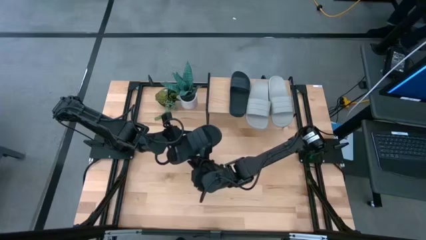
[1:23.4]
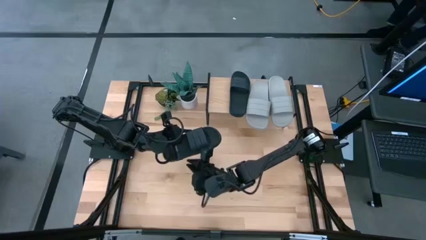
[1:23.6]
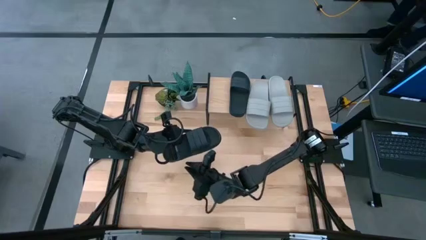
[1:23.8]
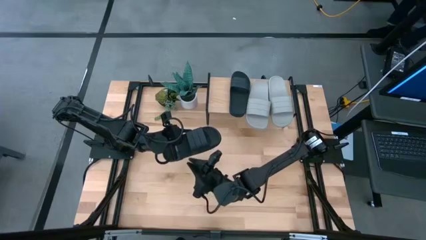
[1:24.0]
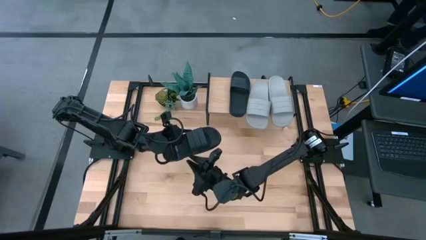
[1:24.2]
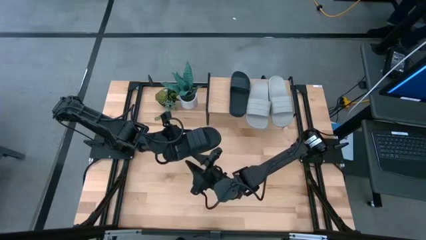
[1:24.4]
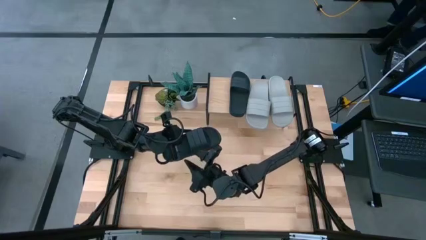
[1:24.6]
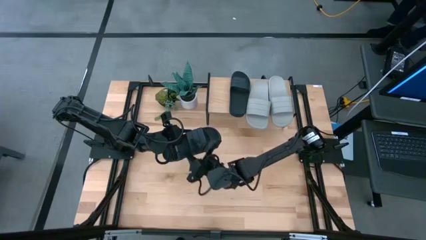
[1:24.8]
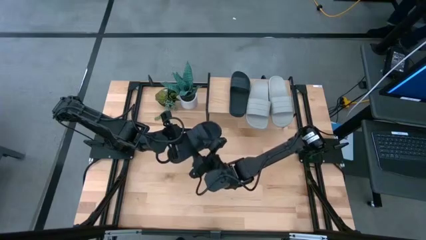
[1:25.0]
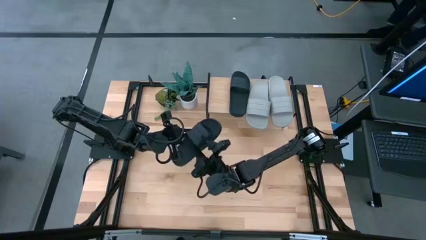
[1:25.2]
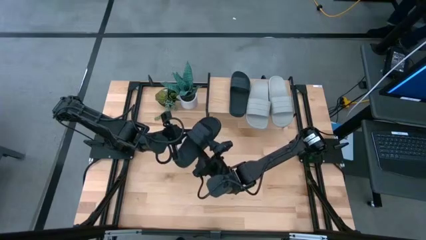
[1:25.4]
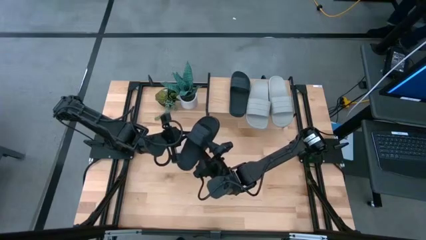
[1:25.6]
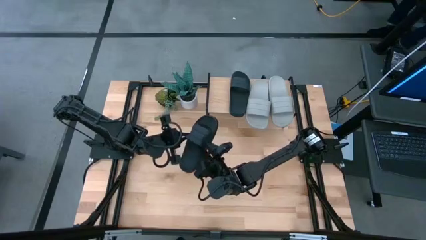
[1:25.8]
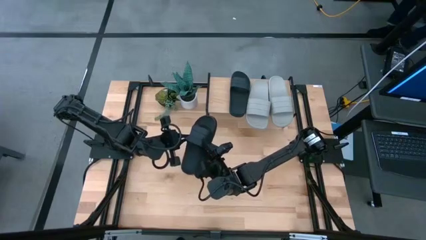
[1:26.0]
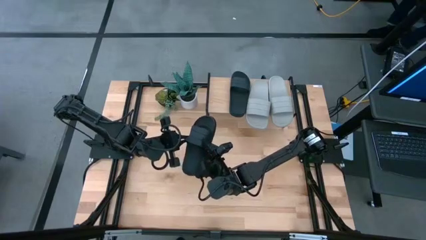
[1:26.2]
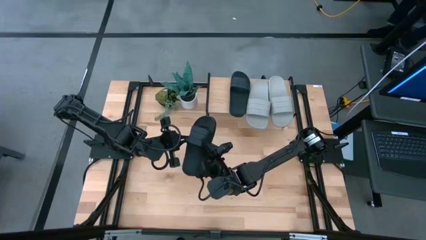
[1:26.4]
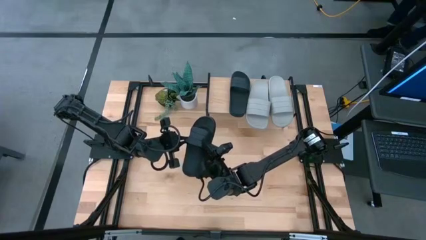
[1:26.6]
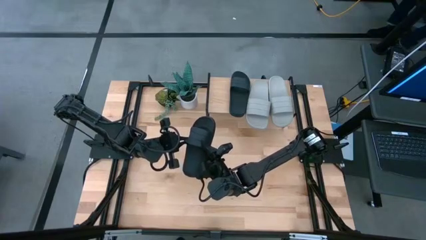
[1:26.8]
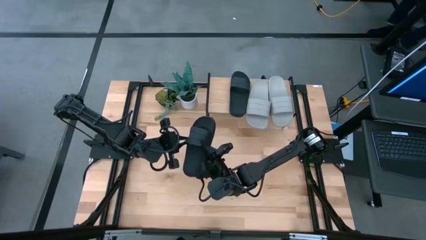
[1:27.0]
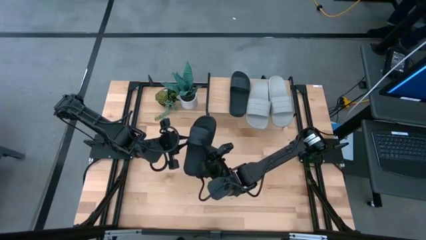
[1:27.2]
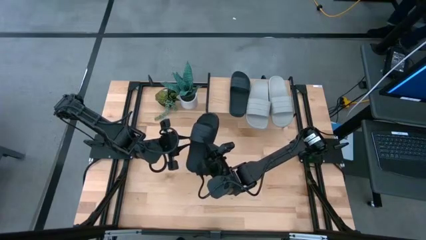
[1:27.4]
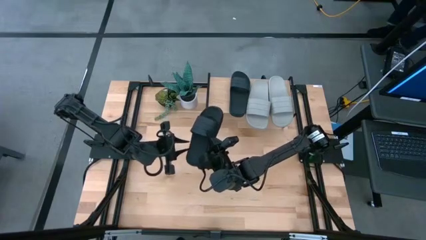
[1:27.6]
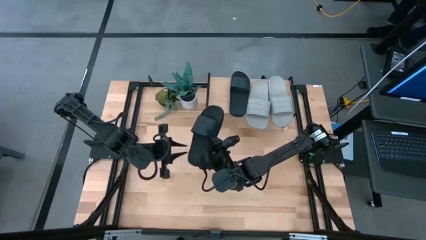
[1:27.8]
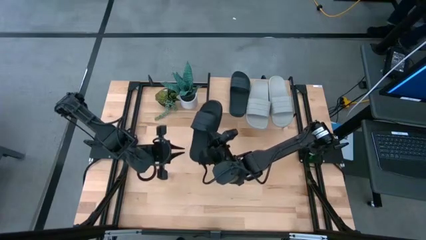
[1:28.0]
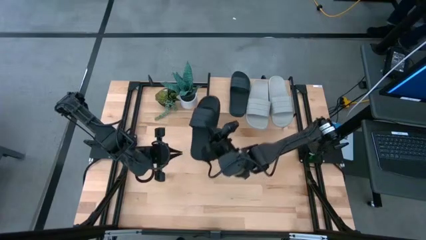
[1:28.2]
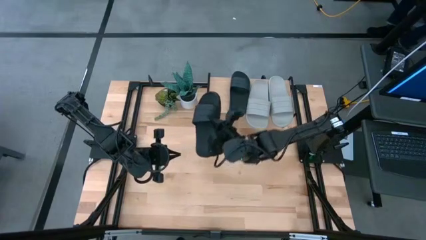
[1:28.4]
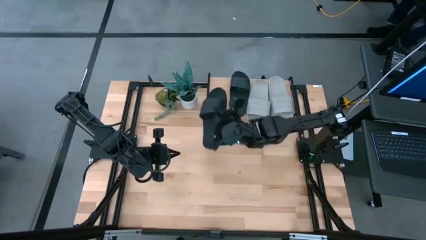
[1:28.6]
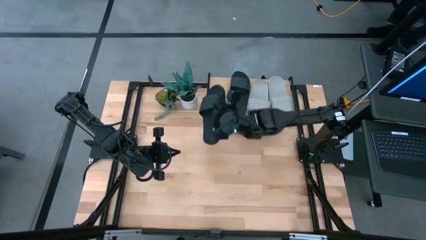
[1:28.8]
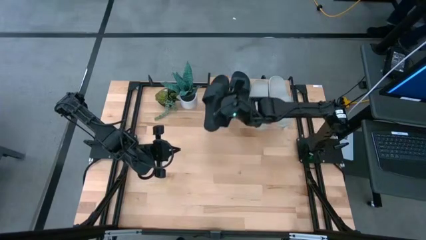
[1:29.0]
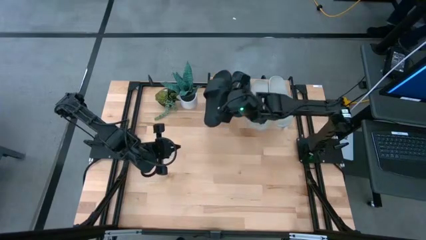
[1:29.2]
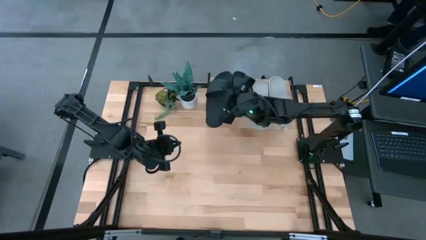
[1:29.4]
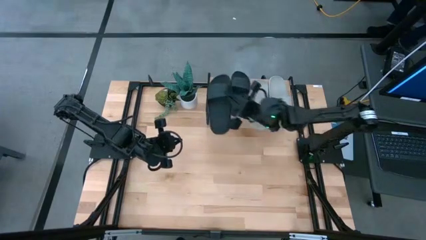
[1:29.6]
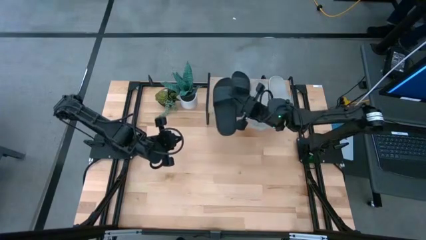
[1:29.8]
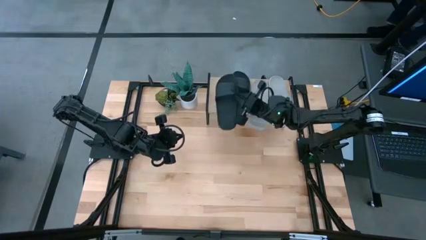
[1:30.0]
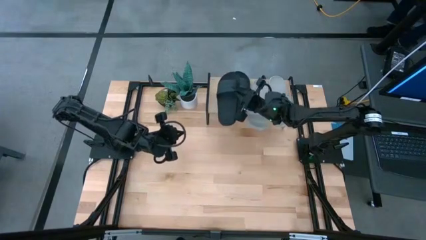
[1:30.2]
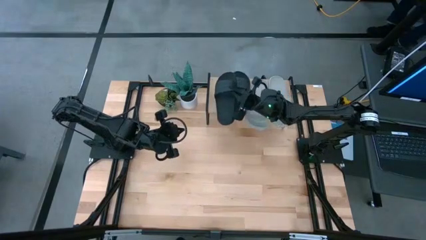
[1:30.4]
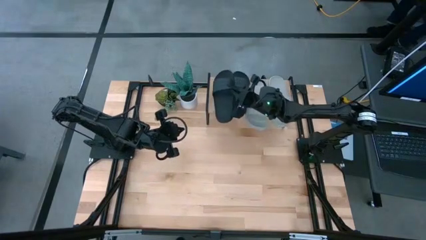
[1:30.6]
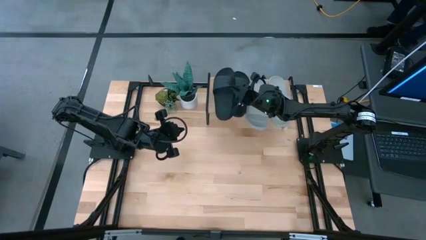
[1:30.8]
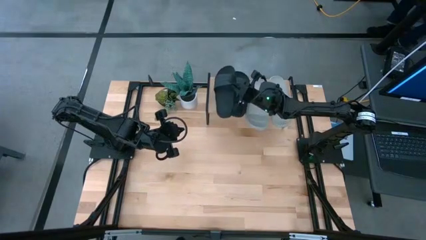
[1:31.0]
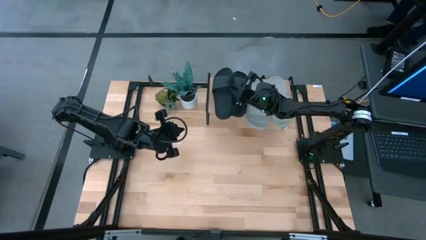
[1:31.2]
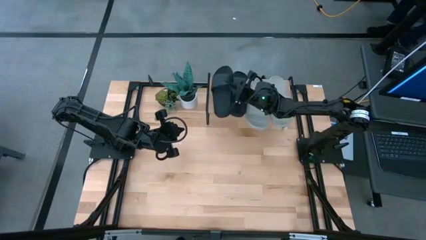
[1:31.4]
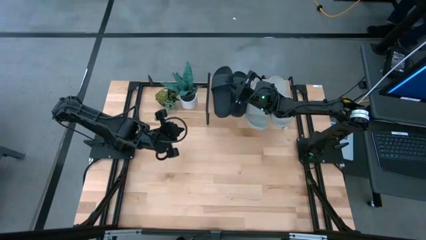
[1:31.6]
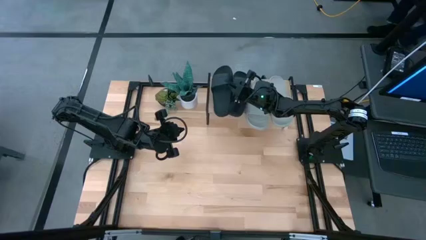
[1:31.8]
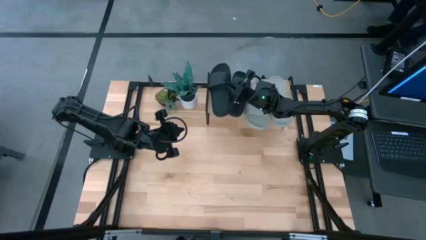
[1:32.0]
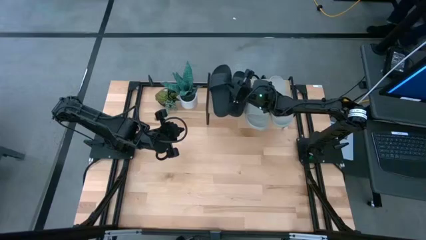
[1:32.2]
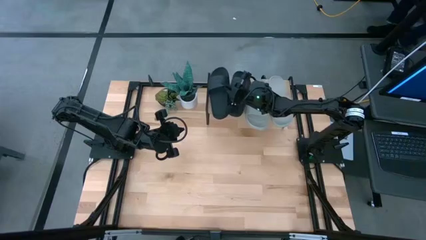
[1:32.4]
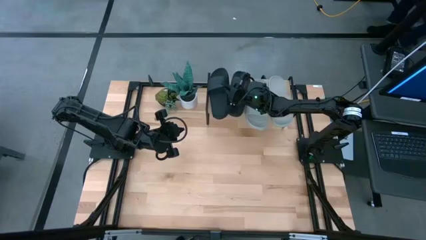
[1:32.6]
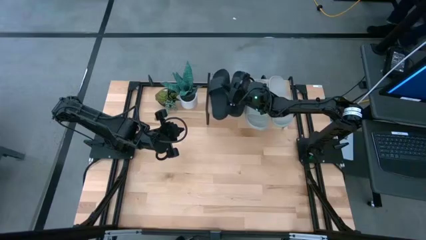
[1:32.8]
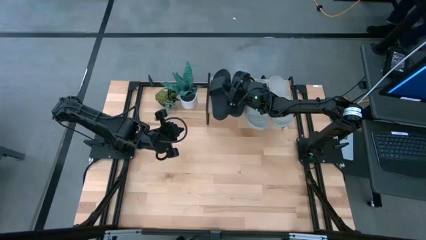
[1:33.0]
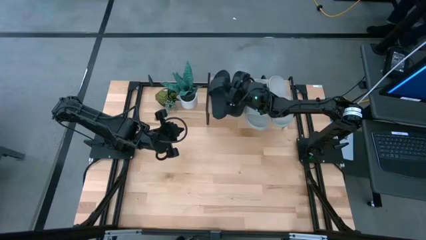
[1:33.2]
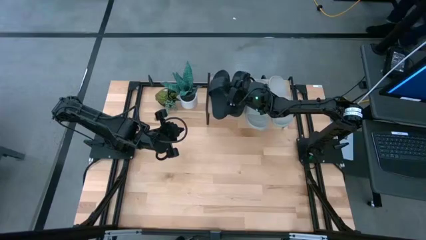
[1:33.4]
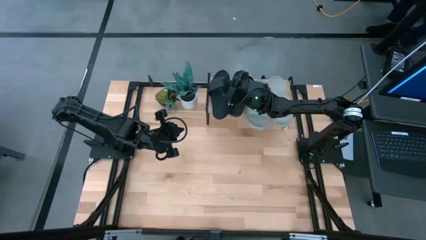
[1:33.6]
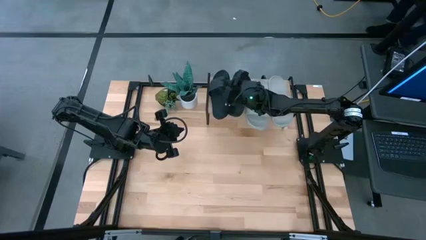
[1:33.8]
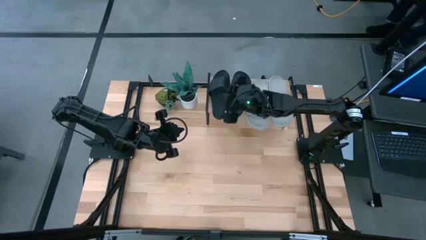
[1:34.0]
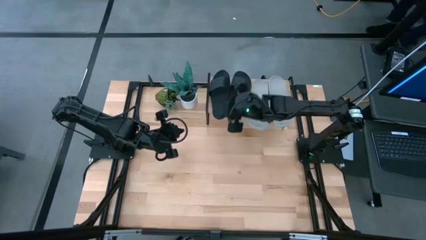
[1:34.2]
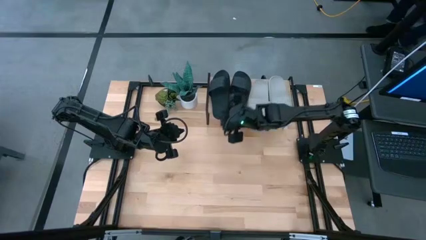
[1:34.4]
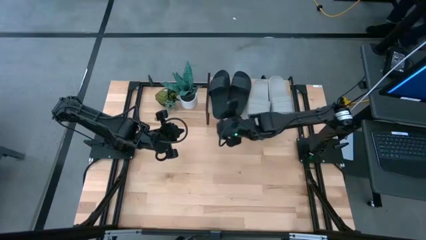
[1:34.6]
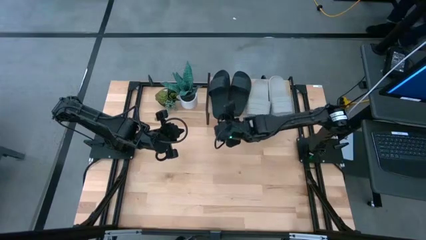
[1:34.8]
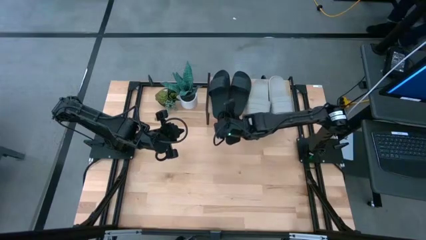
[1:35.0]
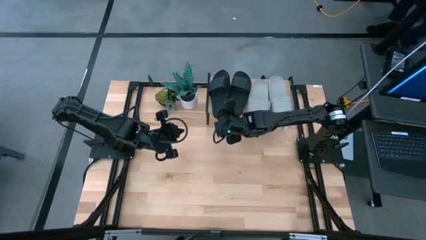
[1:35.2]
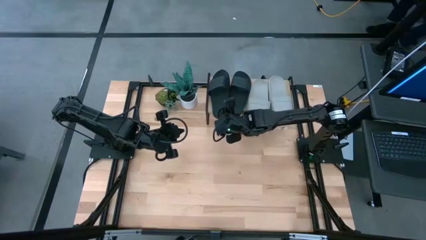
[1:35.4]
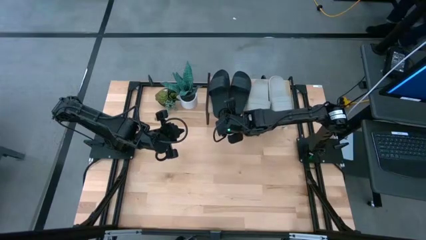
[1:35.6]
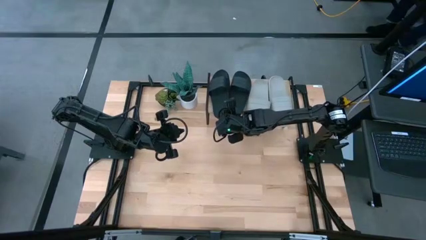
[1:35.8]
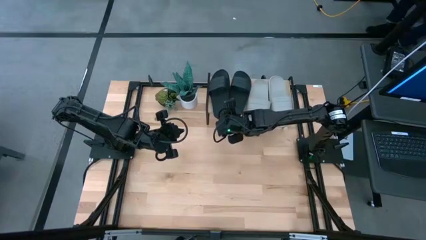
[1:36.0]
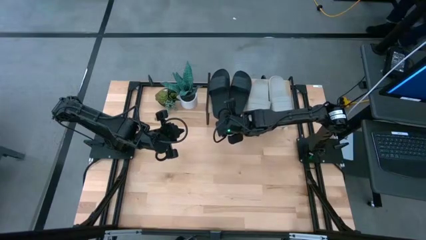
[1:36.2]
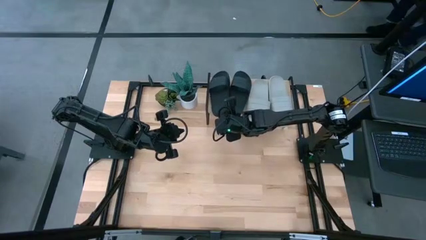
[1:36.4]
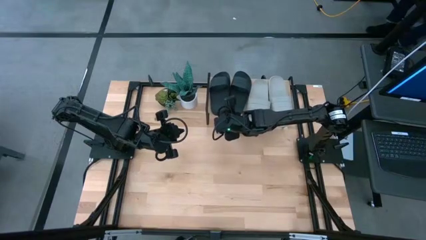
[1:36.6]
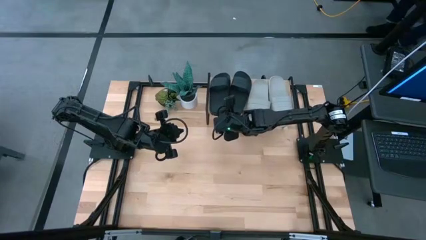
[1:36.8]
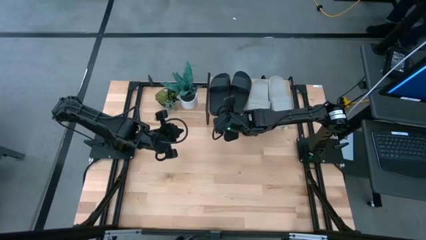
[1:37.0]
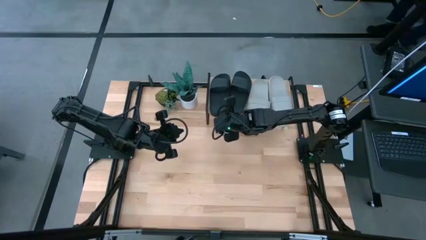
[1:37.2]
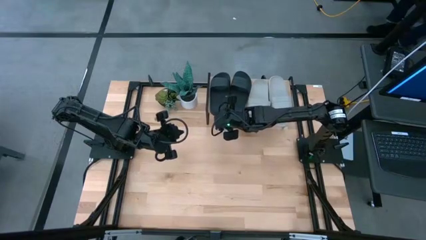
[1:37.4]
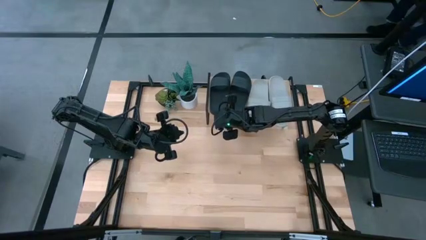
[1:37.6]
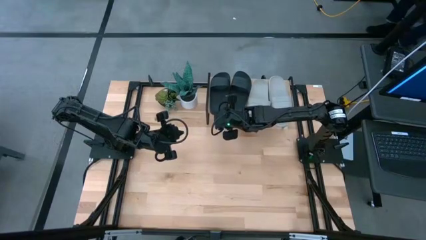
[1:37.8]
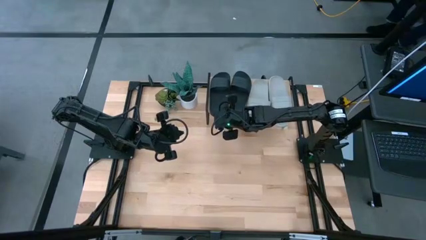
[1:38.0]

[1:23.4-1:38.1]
Task: Pick and place slides into the shelf
Put the black slipper on the shelf
